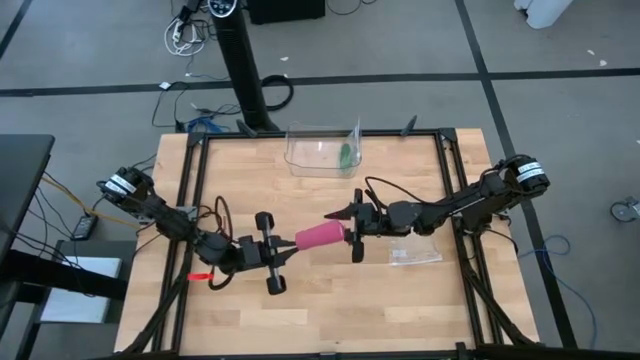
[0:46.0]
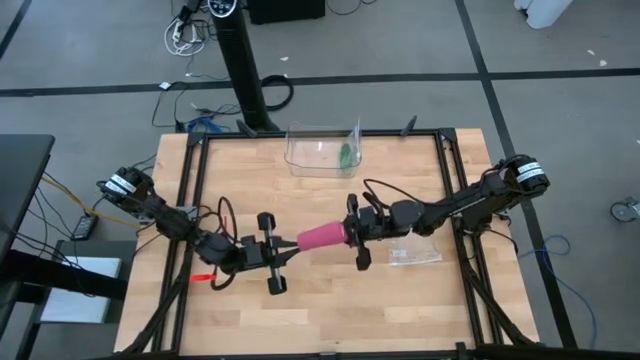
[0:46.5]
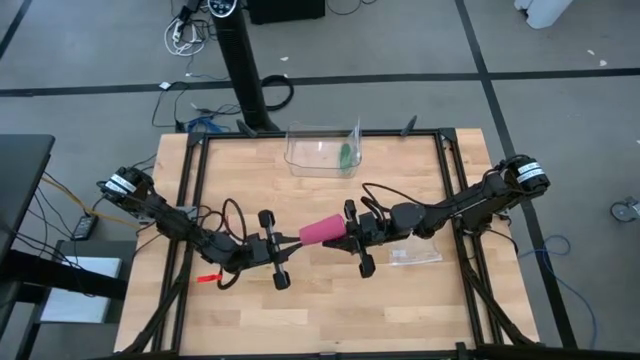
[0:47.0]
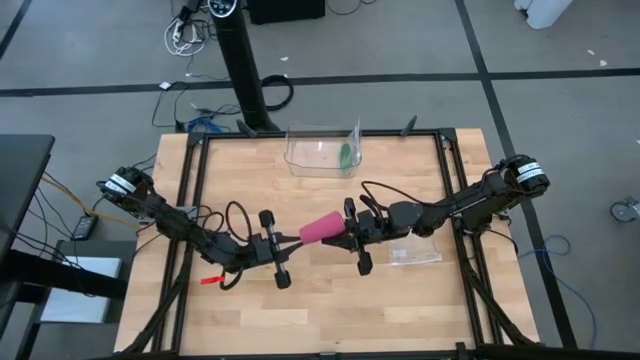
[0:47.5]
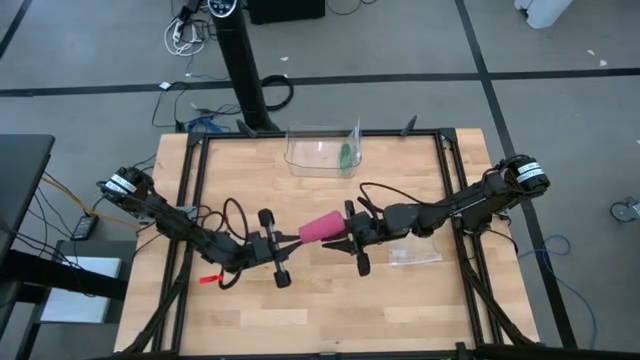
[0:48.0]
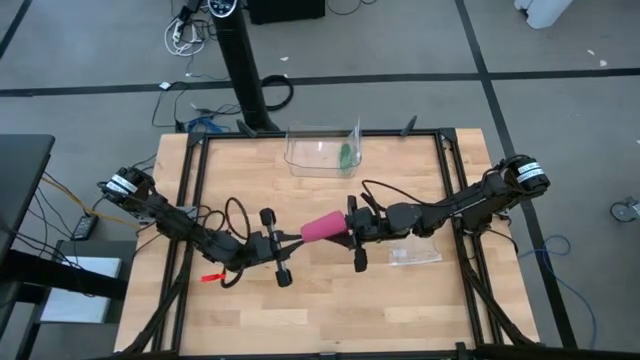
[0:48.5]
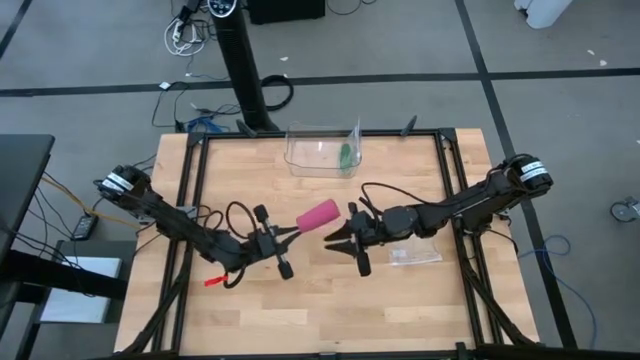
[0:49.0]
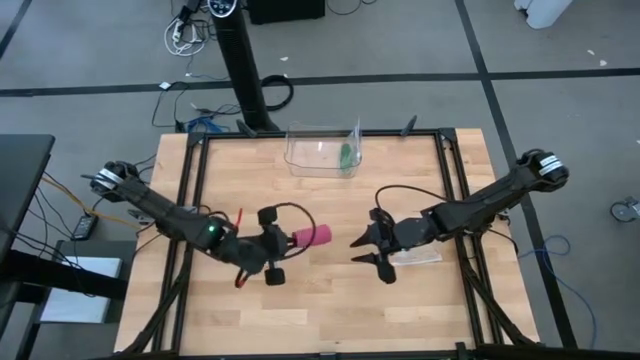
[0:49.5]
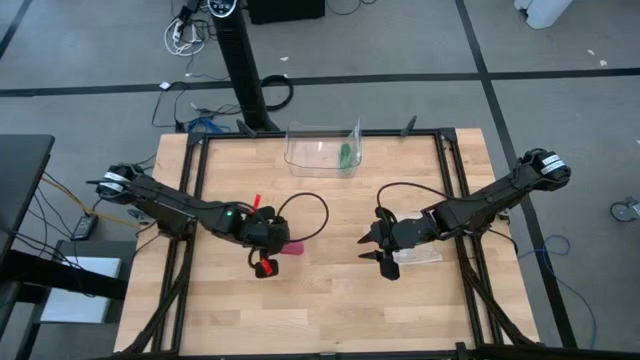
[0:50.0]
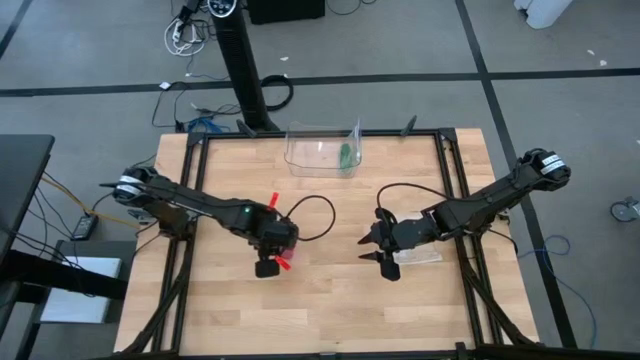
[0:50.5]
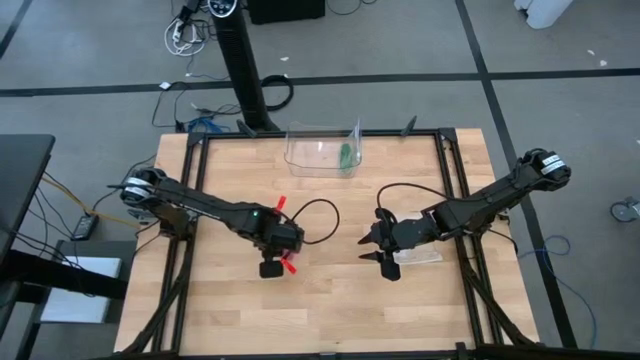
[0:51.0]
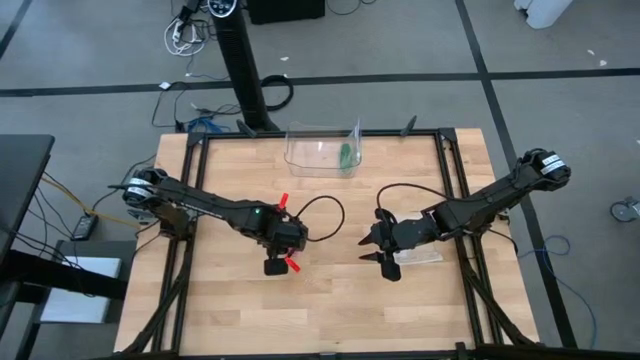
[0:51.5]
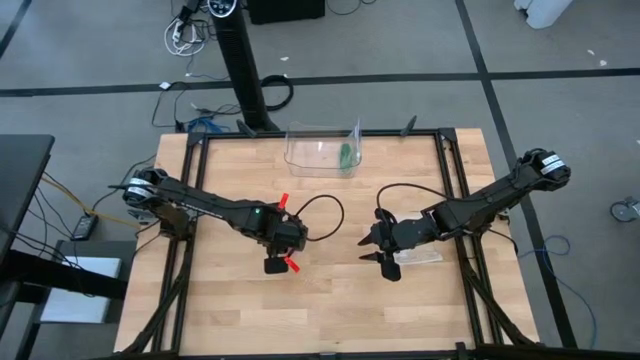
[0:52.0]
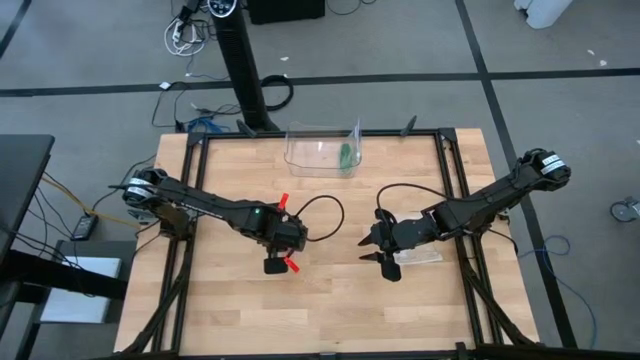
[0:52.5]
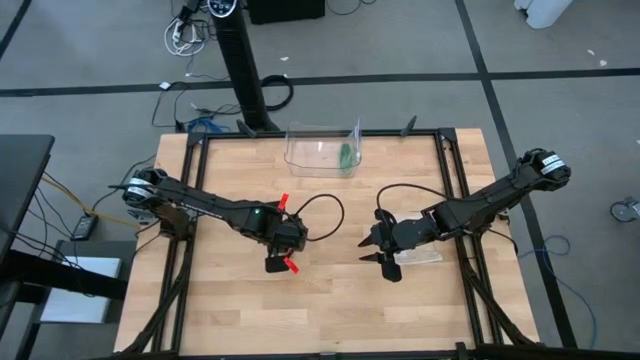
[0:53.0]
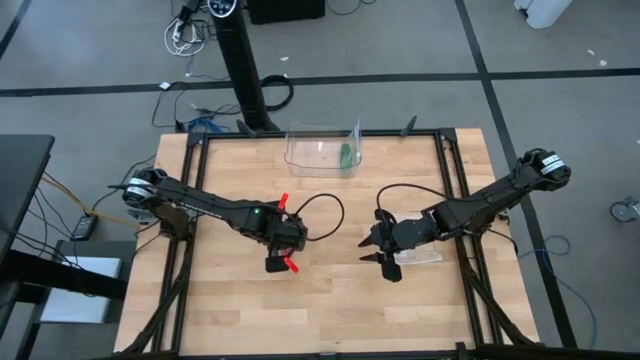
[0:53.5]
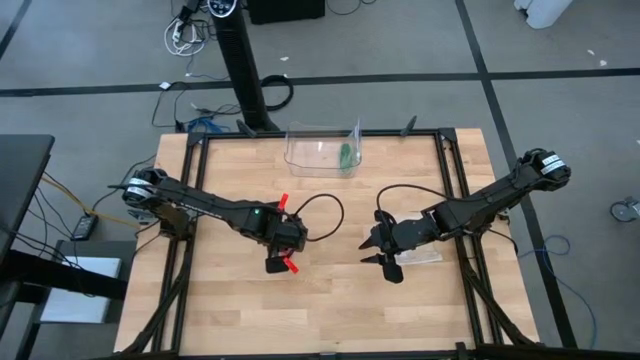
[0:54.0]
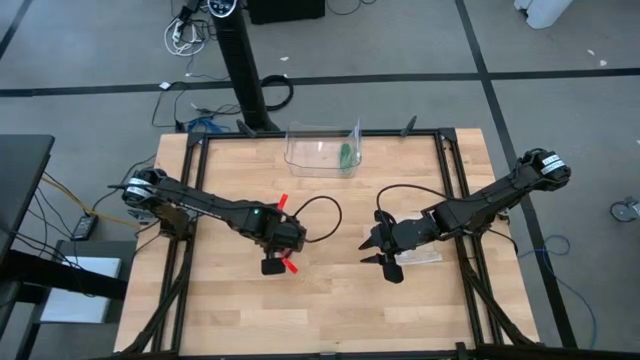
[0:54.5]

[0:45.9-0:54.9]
Task: Roll bandage
Roll the pink bandage

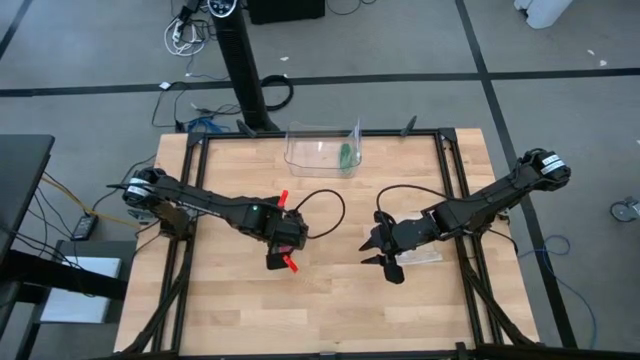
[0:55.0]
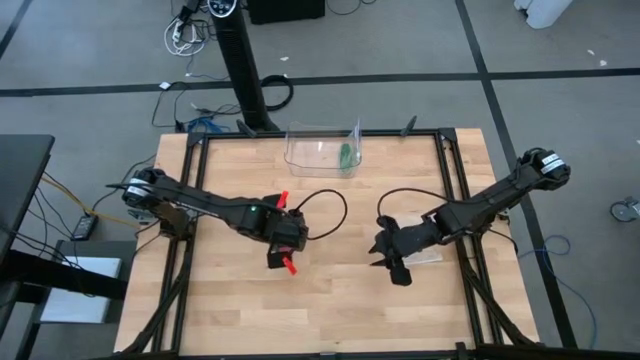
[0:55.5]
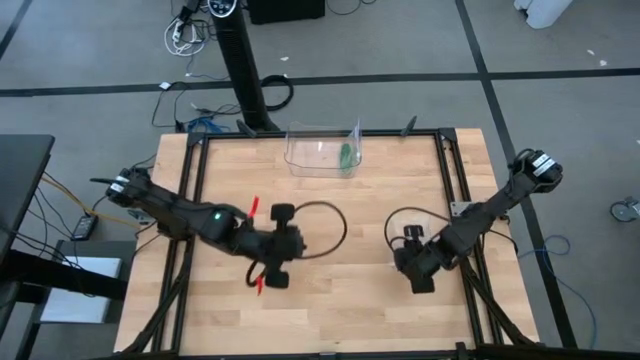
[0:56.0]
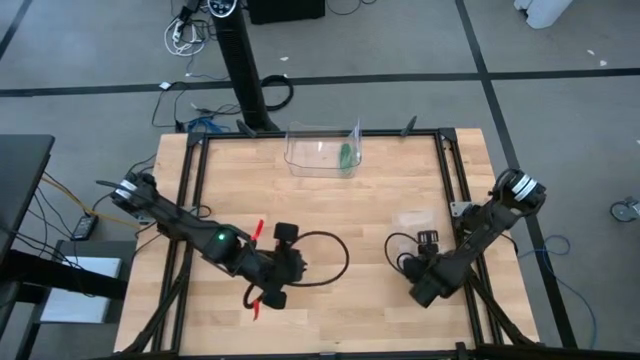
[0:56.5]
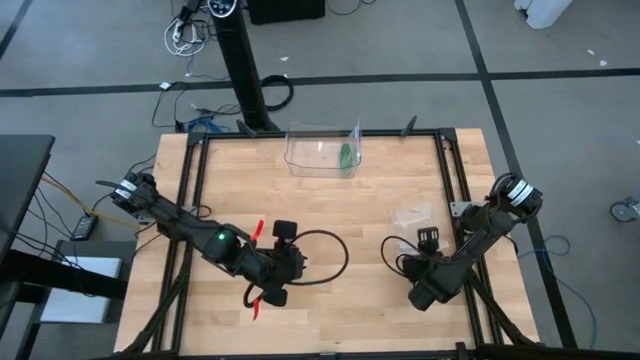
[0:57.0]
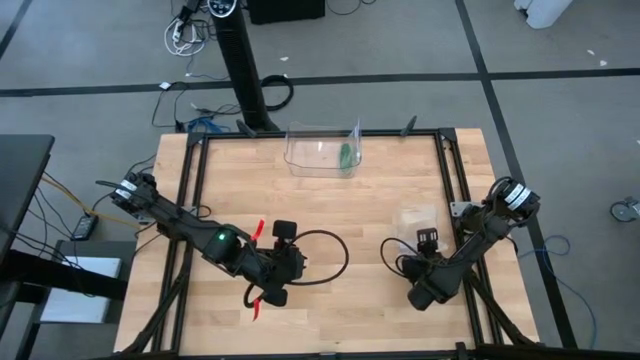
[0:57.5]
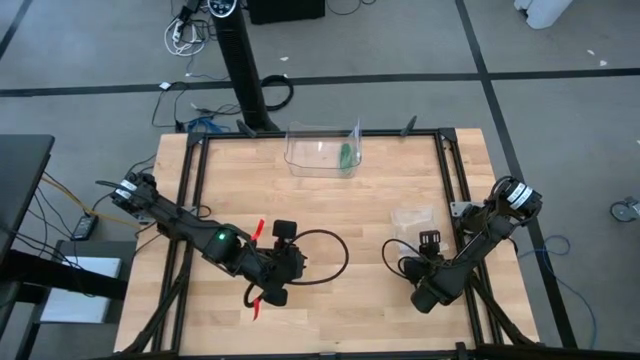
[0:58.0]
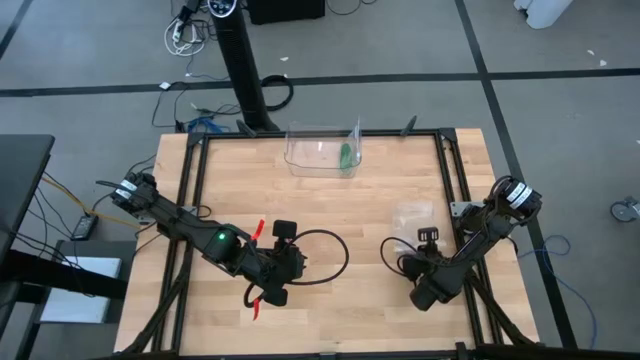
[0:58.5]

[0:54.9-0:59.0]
Put the pink bandage into the transparent zip bag

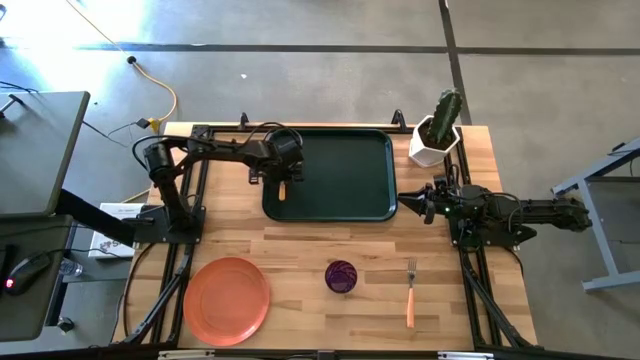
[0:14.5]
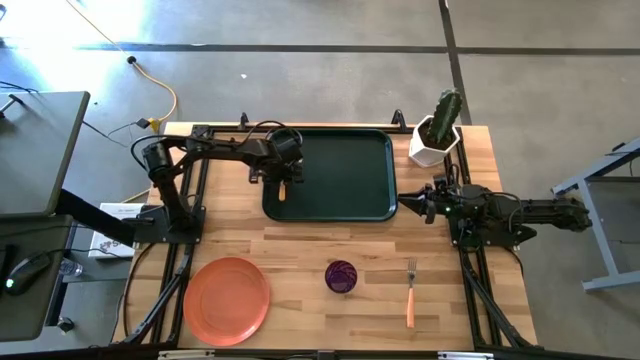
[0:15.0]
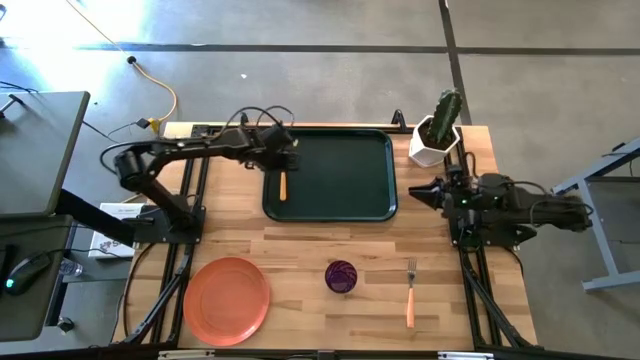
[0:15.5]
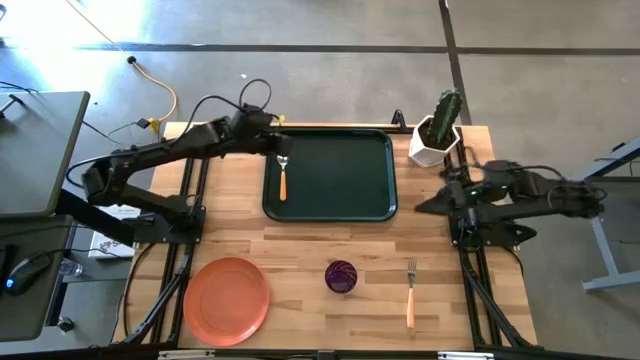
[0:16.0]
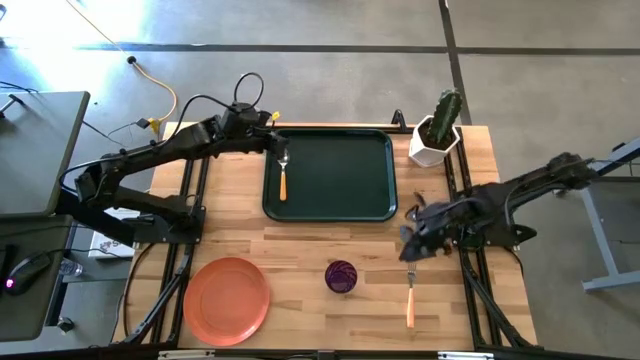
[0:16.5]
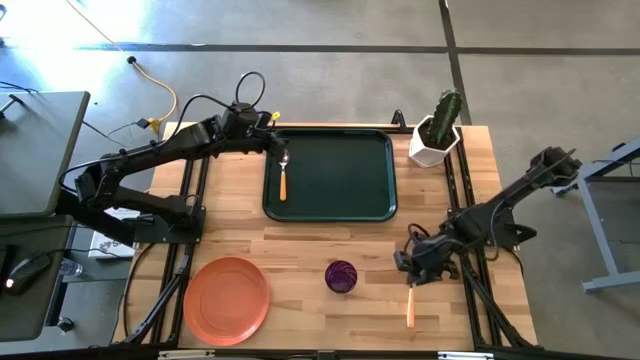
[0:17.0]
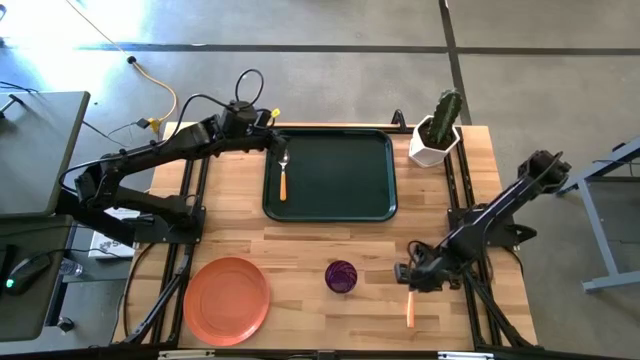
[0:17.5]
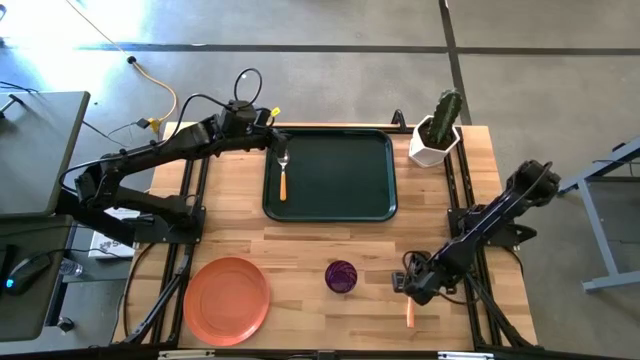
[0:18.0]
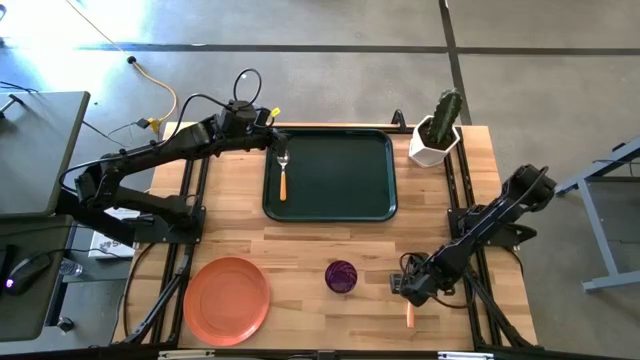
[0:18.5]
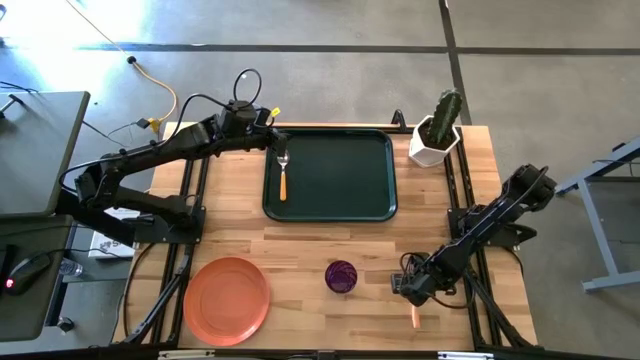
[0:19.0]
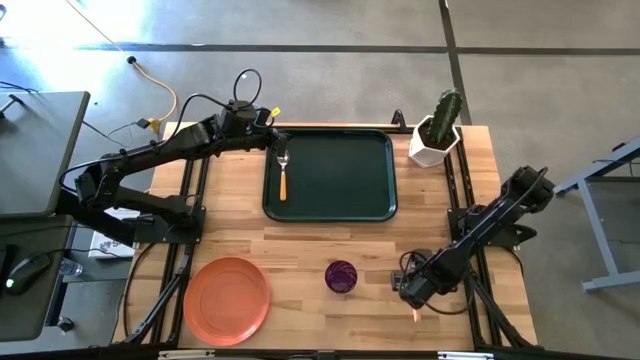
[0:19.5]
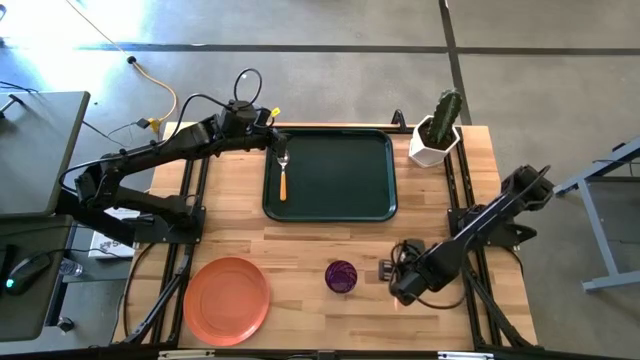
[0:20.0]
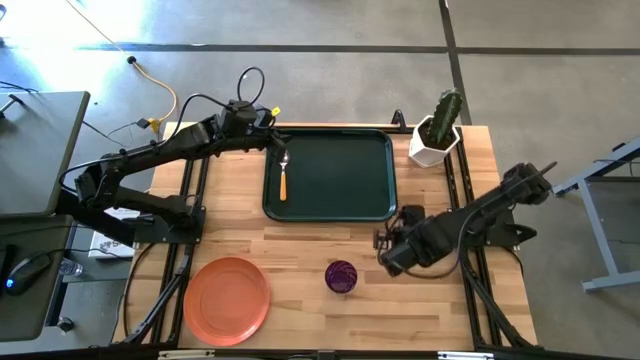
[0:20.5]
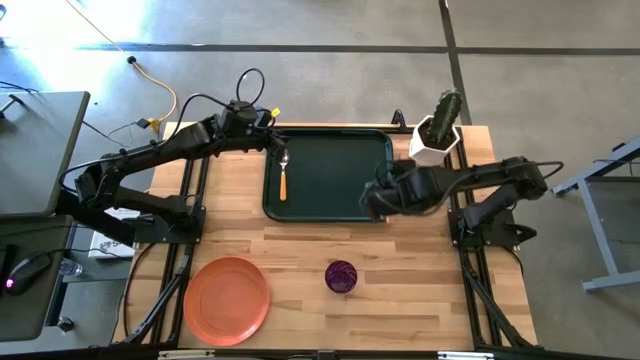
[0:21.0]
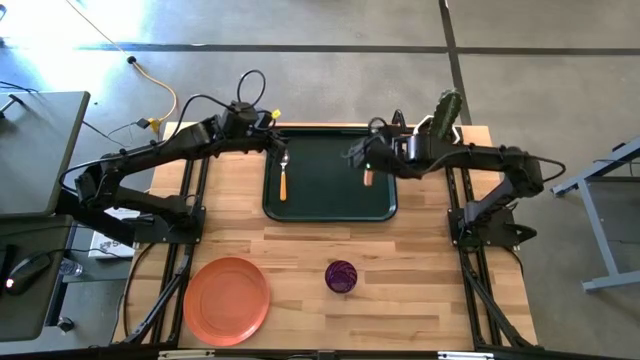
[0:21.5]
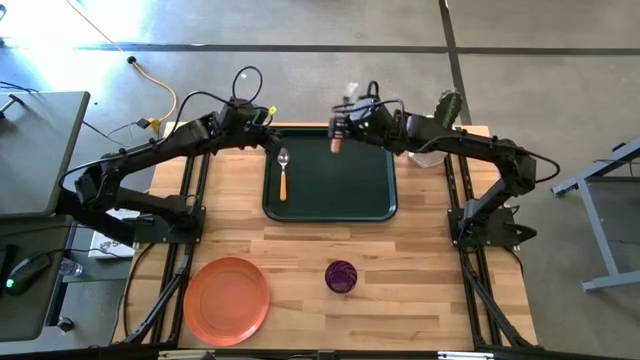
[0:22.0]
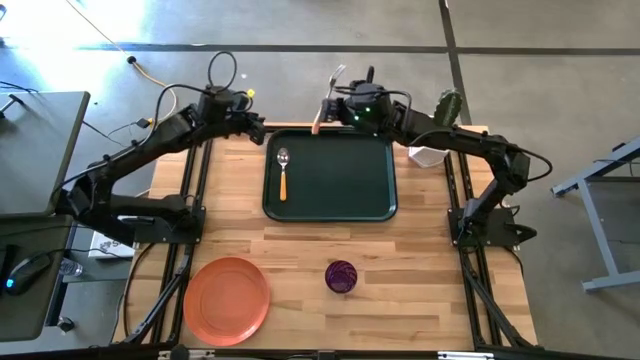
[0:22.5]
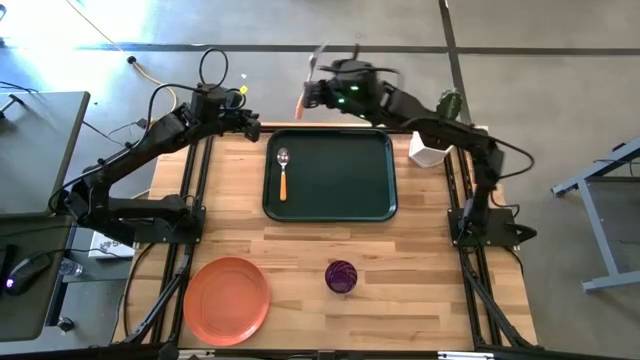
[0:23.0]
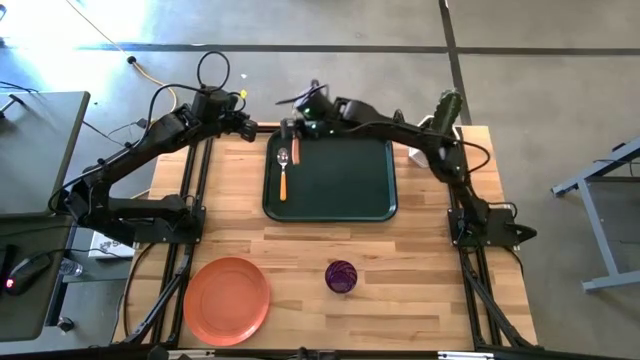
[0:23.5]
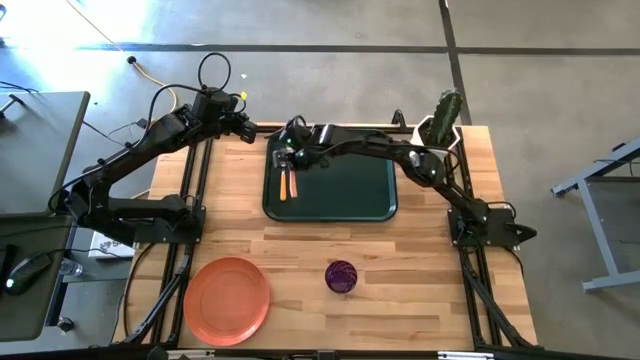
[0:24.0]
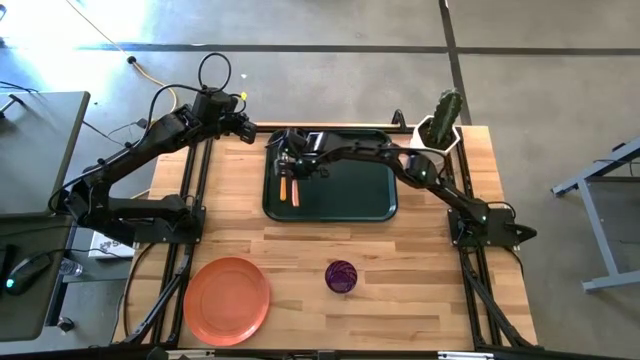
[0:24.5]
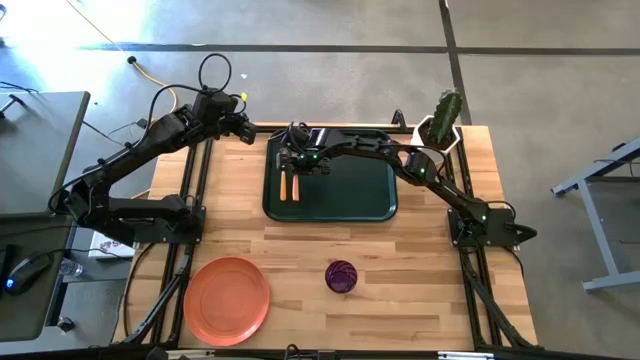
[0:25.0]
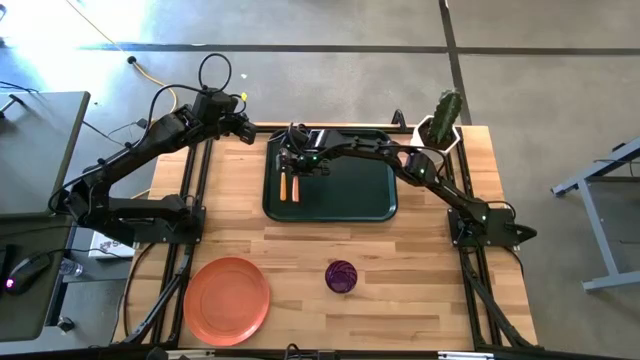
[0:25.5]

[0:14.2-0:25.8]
Task: Pick and place plate/cup/fork/spoon on tray
Put the light orange fork on the right side of the orange spoon
